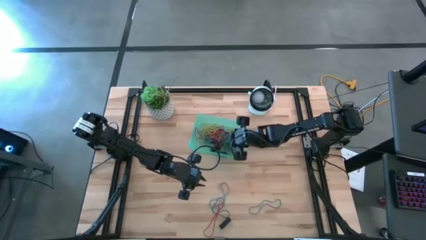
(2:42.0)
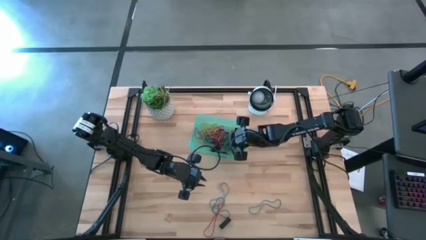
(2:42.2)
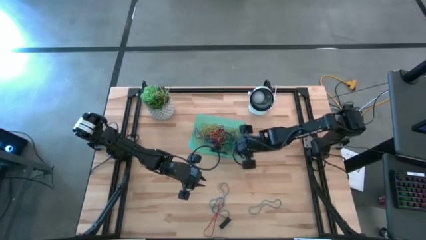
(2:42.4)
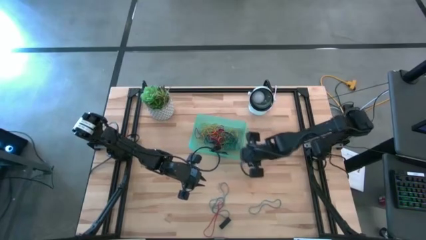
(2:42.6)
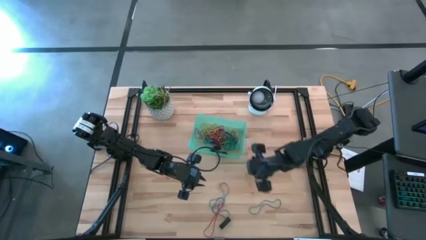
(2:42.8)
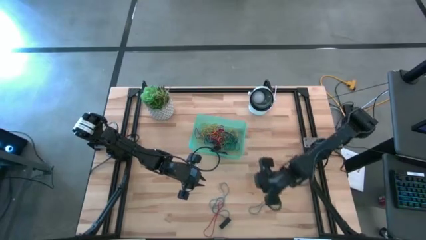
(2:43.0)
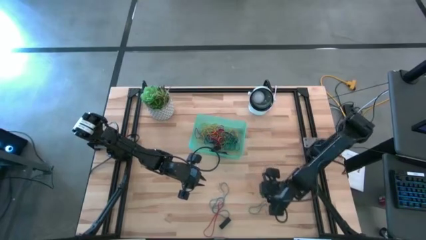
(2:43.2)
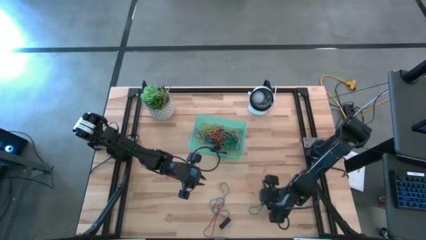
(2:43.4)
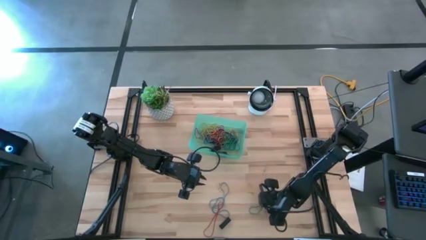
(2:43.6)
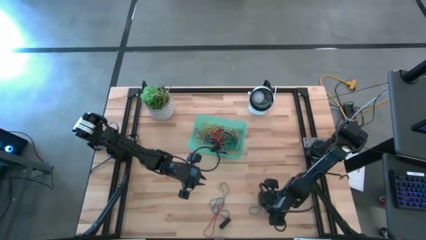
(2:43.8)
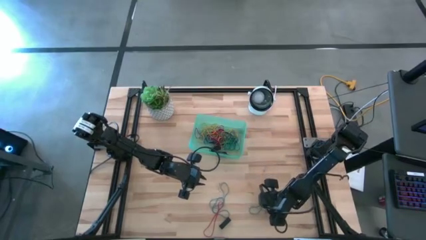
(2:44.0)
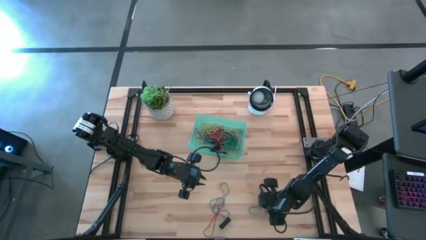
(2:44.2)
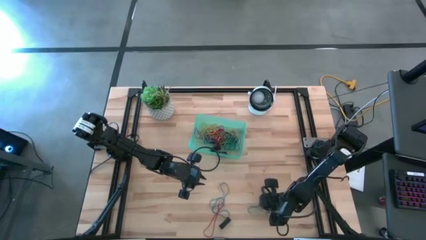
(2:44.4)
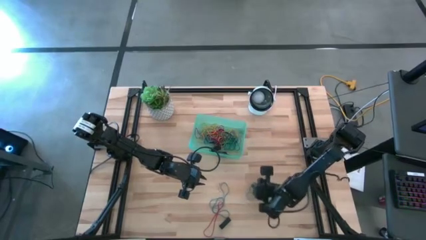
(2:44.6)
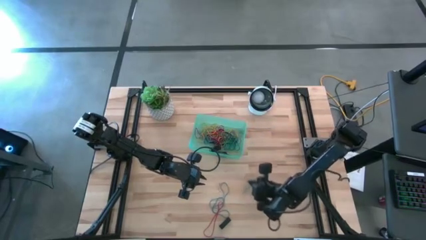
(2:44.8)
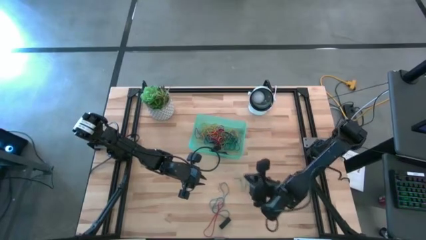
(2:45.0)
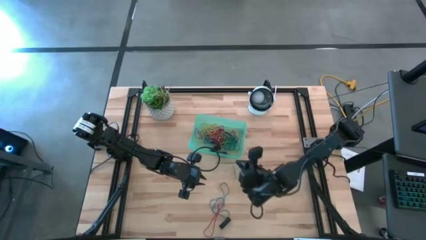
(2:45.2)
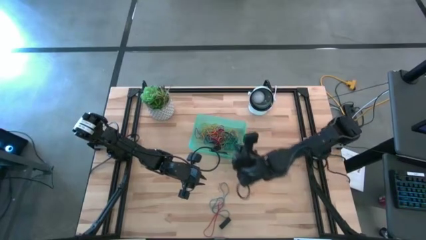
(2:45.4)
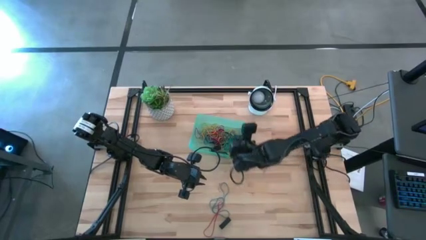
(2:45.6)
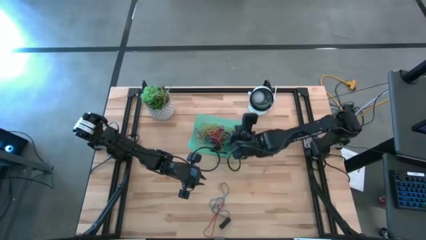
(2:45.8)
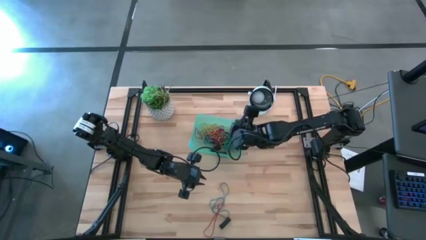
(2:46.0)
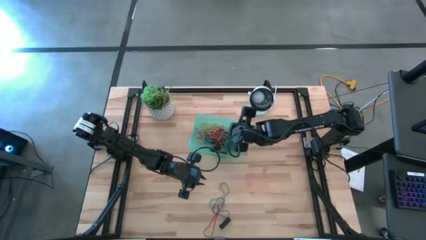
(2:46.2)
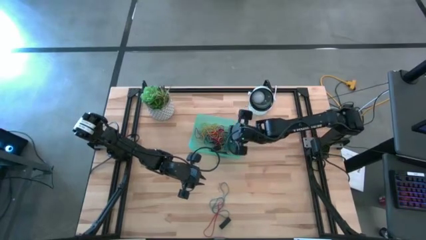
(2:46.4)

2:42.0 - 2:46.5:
Task: Pick and place rubber bands into bin
Put the blue rubber band into the green bin

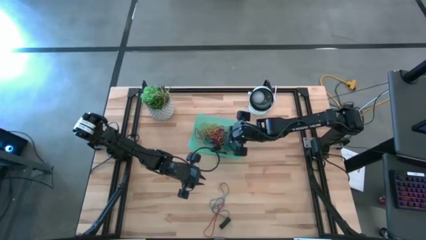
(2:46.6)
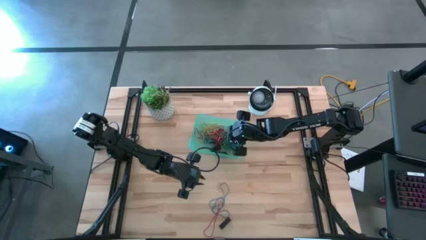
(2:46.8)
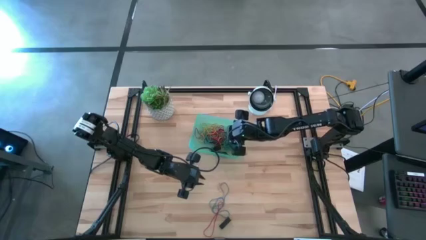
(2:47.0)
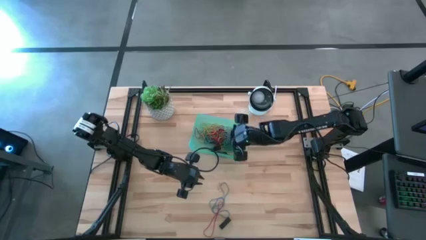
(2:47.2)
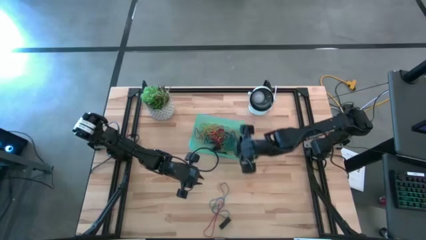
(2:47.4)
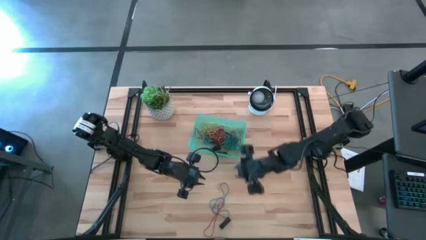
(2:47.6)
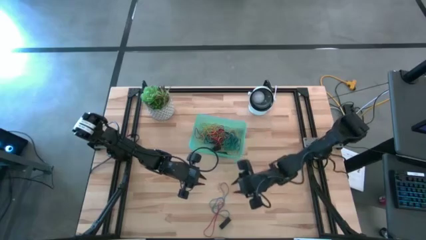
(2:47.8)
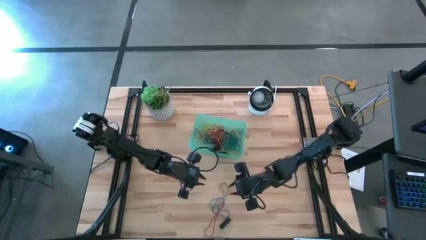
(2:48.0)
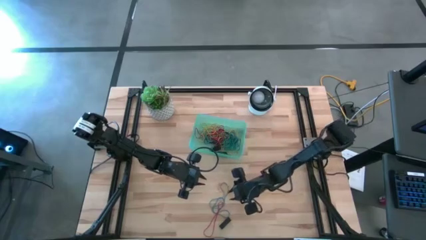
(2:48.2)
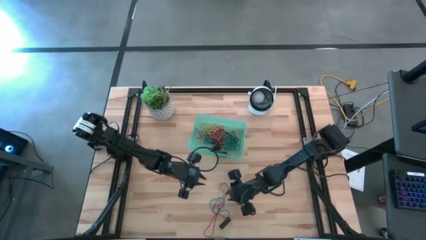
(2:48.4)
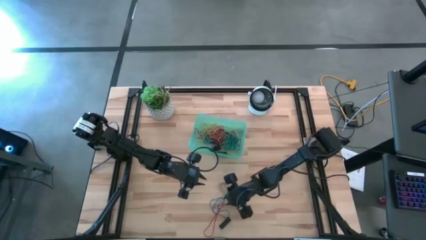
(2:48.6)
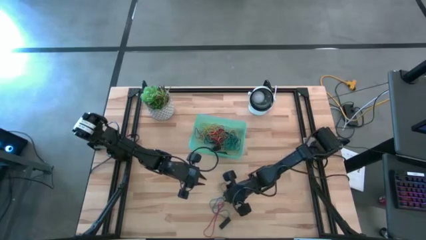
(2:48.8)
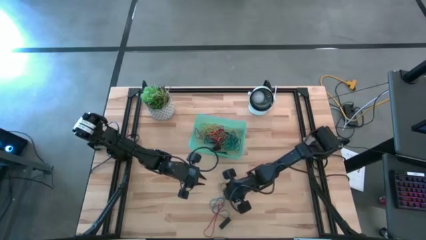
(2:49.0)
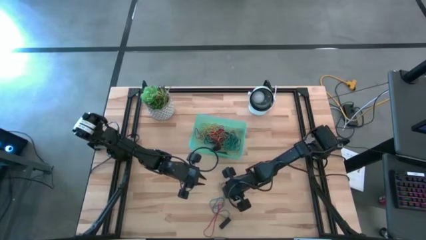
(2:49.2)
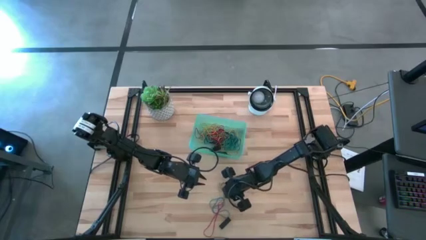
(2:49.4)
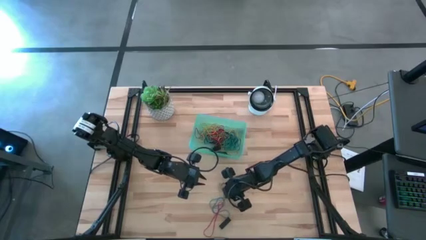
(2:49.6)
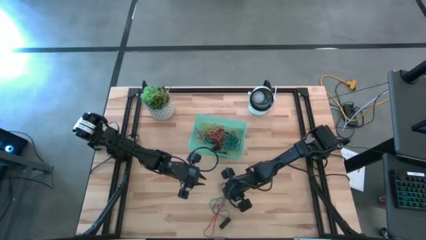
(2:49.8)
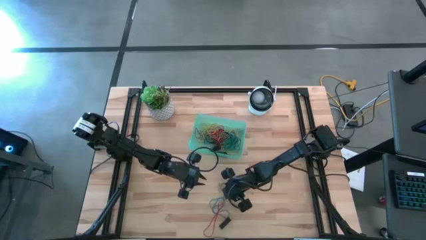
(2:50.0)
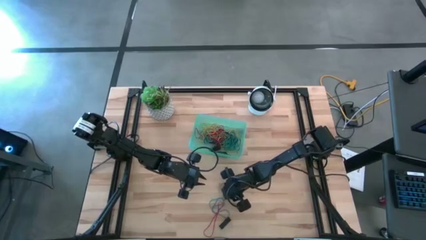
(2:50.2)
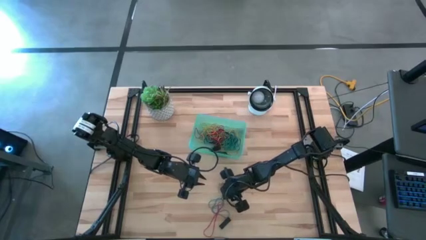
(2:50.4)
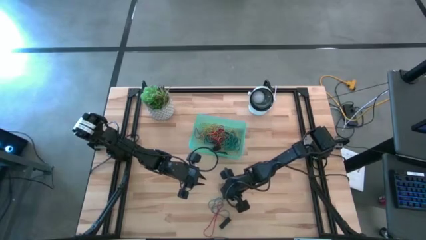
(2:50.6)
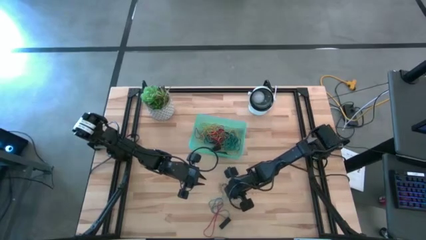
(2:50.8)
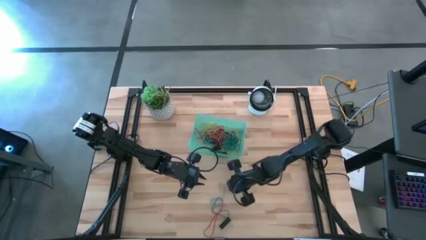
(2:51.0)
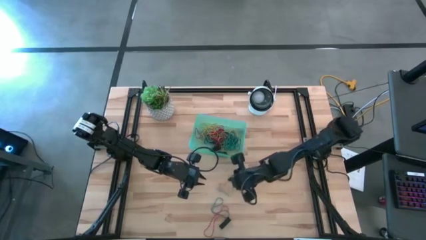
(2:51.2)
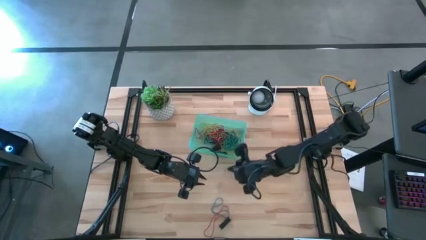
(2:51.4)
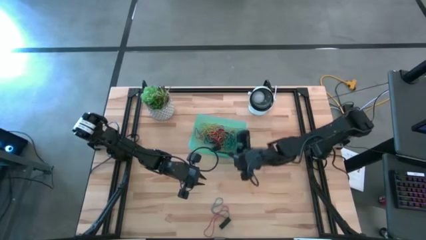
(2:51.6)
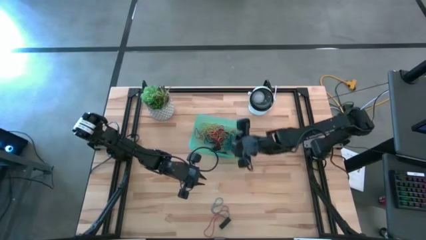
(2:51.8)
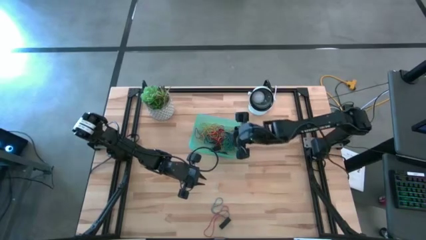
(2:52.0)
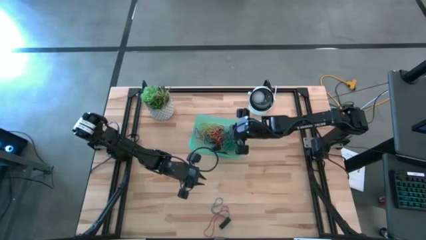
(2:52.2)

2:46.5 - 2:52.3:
Put the blue rubber band into the green bin

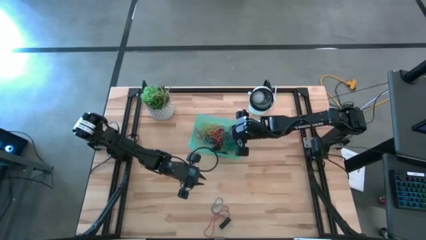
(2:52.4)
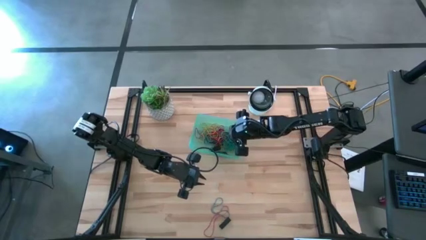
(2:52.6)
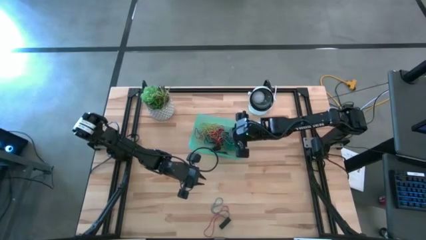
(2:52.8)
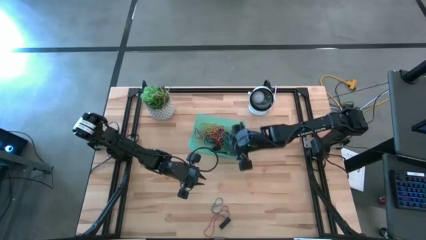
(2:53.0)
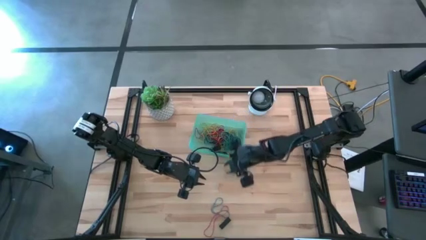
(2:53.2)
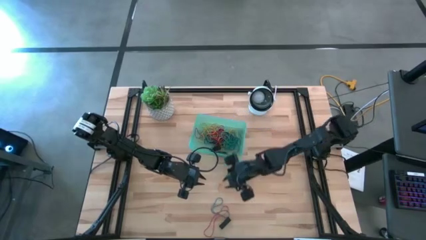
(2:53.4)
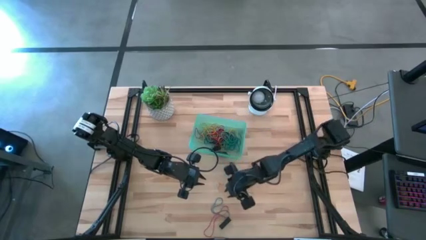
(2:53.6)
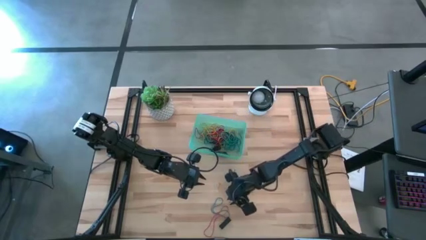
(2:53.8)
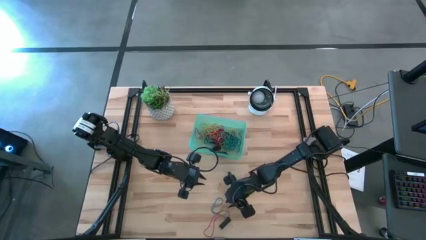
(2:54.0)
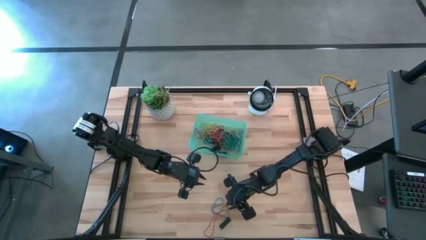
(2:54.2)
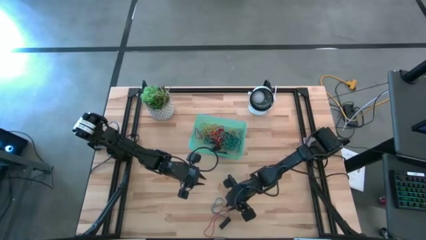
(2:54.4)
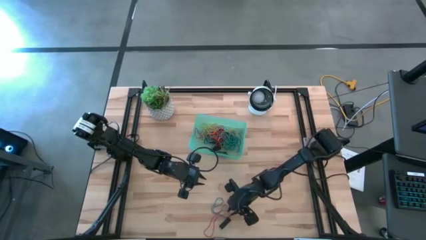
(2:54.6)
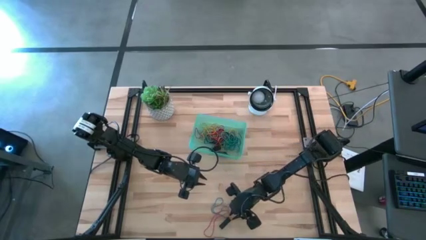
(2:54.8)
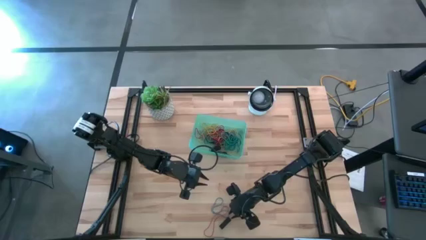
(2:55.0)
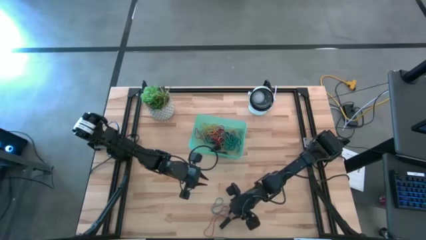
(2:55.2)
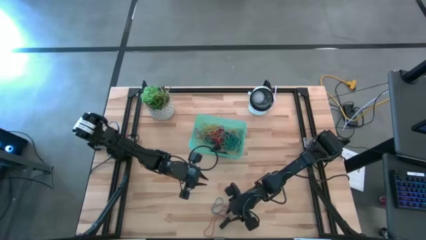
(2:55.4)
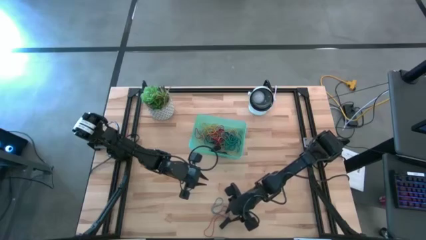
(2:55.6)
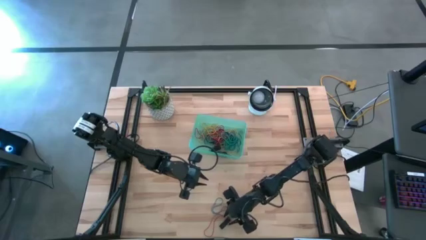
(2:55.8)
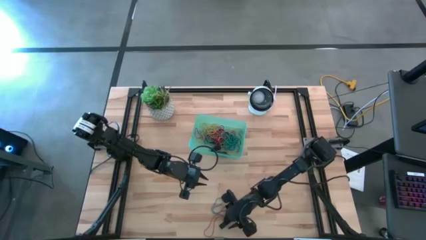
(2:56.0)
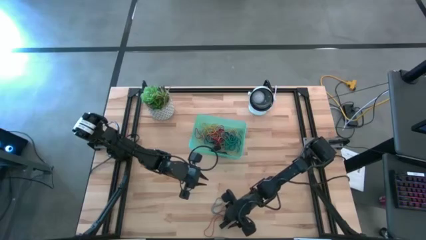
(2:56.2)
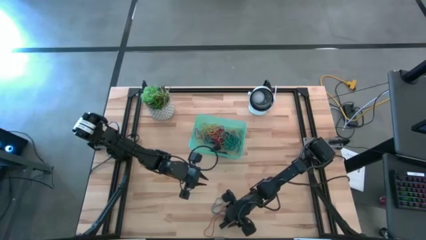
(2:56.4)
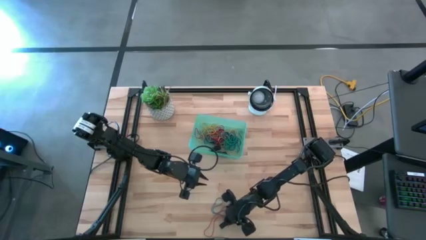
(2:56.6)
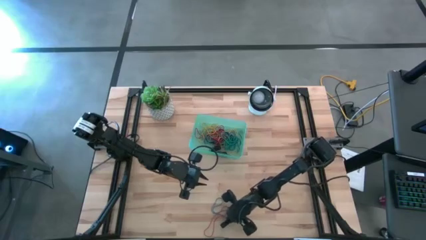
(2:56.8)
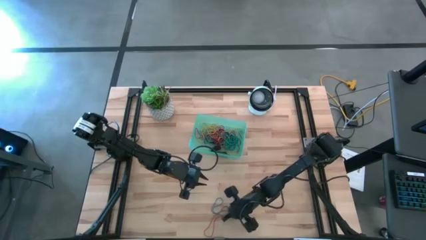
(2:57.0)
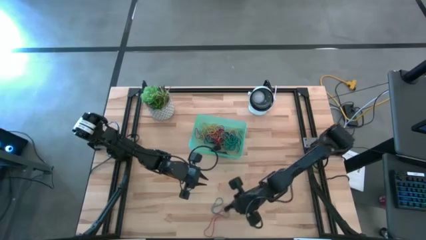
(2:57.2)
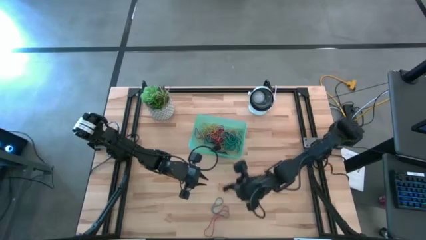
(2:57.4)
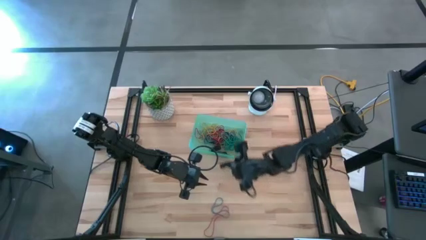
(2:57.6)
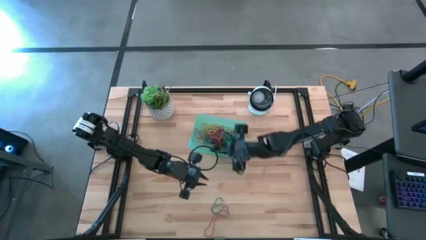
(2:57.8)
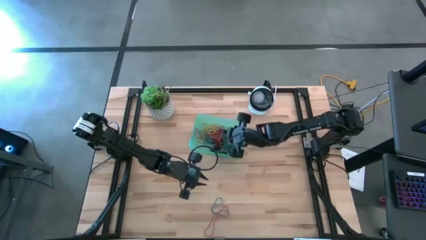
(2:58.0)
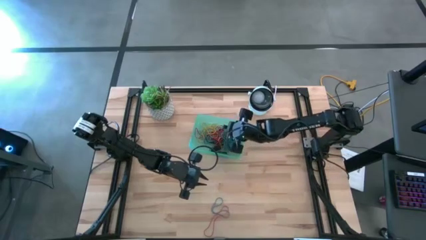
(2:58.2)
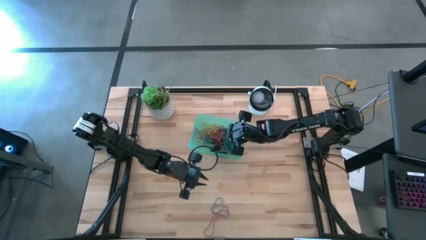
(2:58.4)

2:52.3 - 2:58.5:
Put the black rubber band into the green bin
